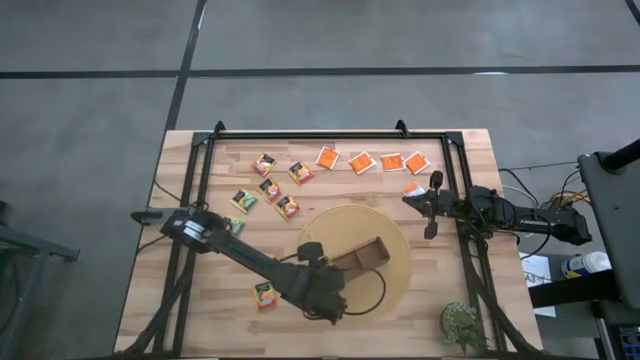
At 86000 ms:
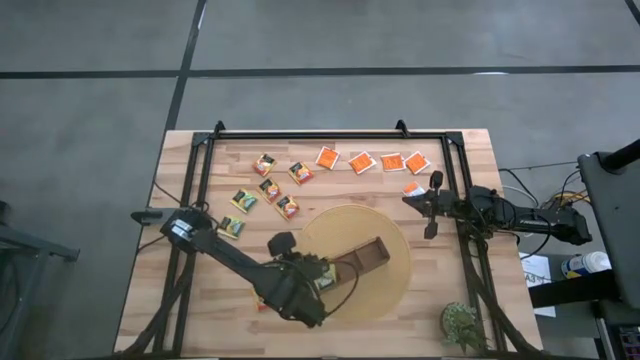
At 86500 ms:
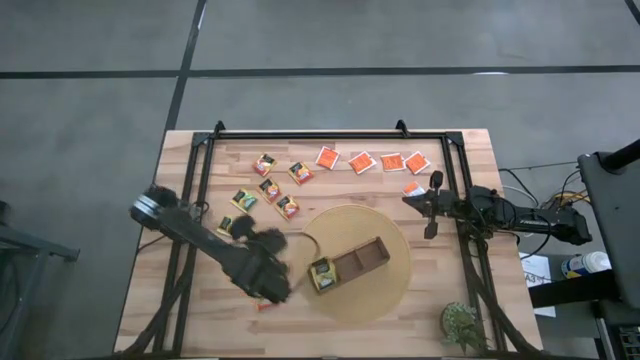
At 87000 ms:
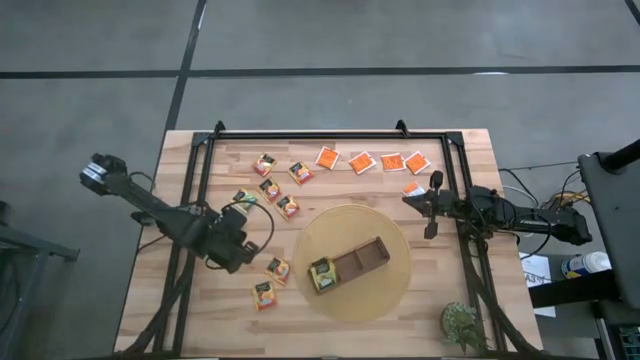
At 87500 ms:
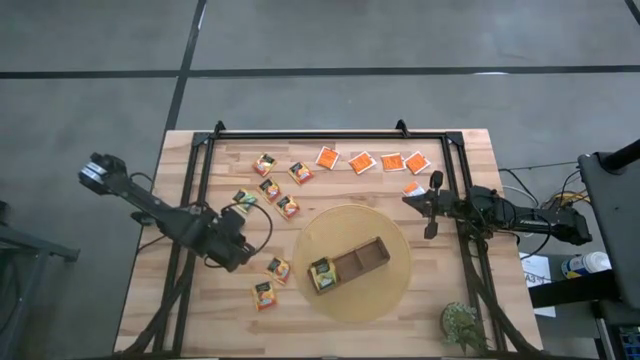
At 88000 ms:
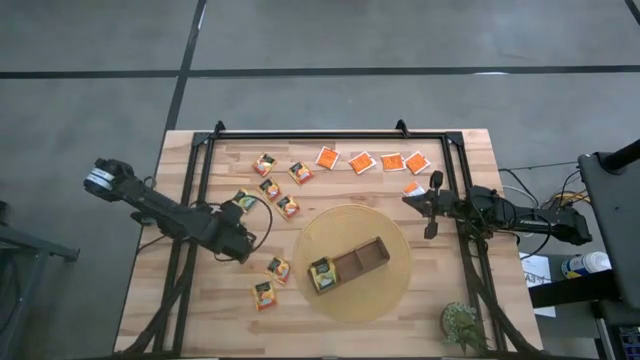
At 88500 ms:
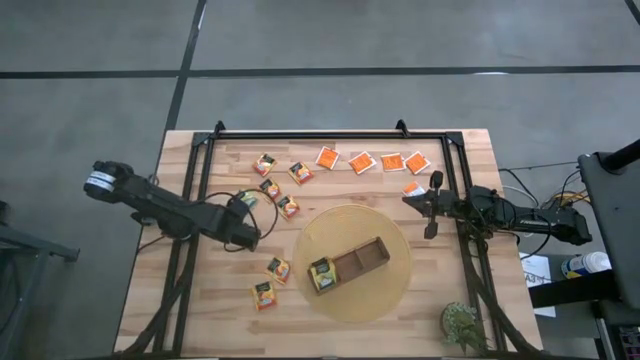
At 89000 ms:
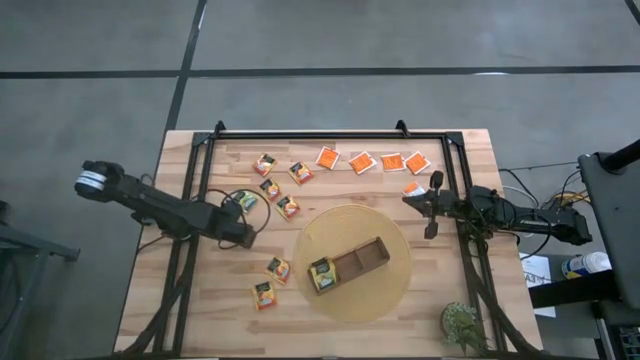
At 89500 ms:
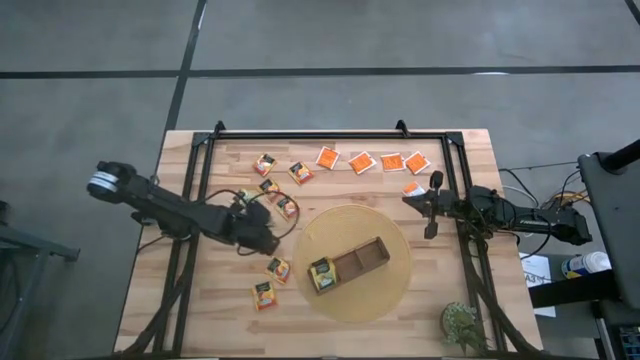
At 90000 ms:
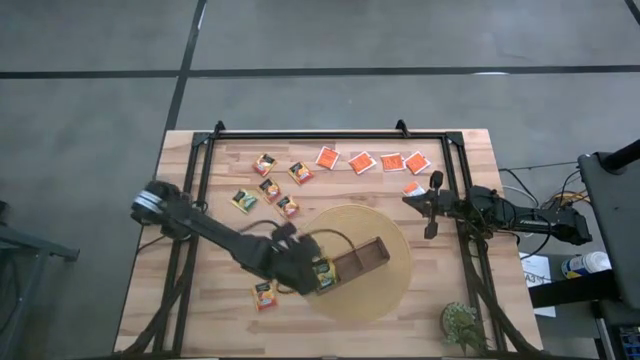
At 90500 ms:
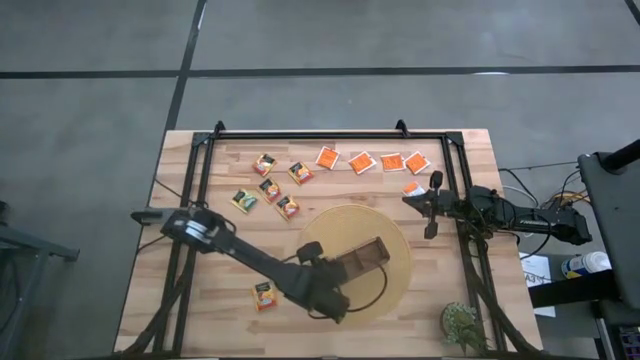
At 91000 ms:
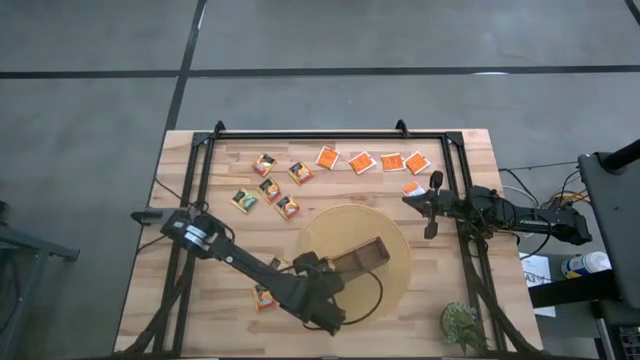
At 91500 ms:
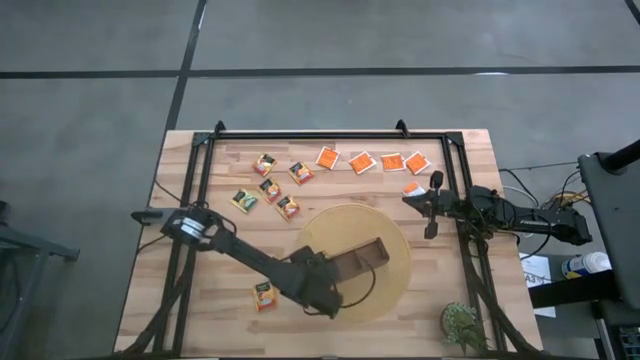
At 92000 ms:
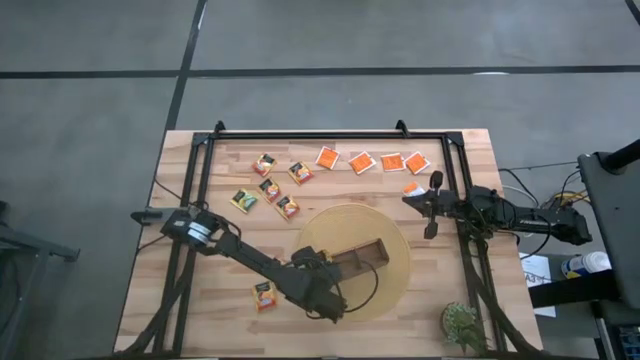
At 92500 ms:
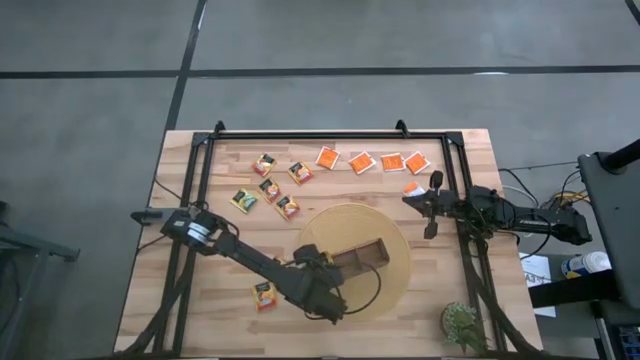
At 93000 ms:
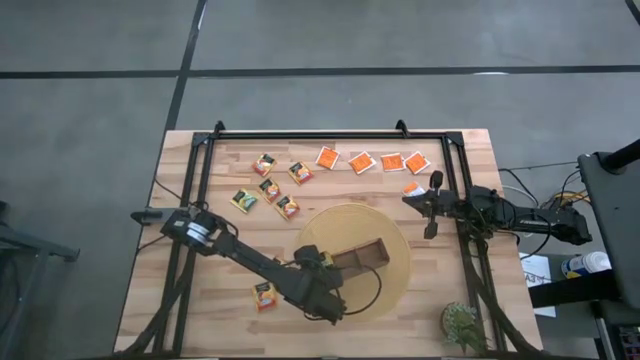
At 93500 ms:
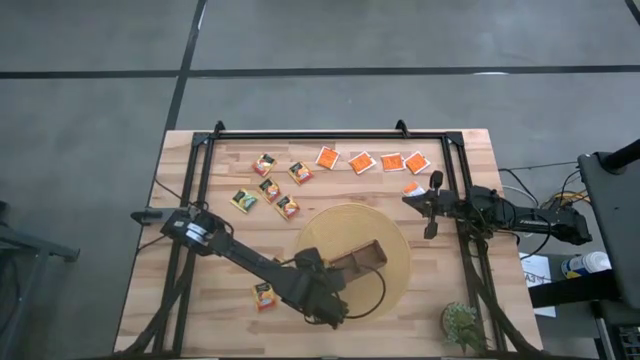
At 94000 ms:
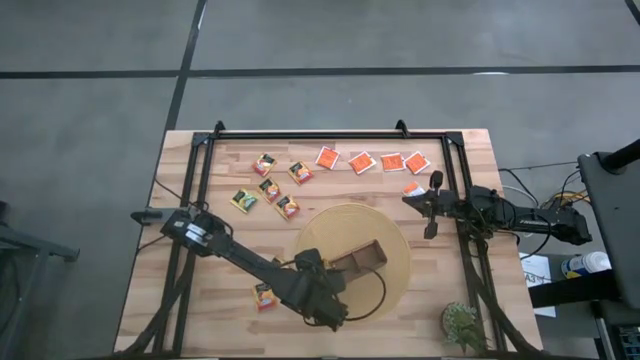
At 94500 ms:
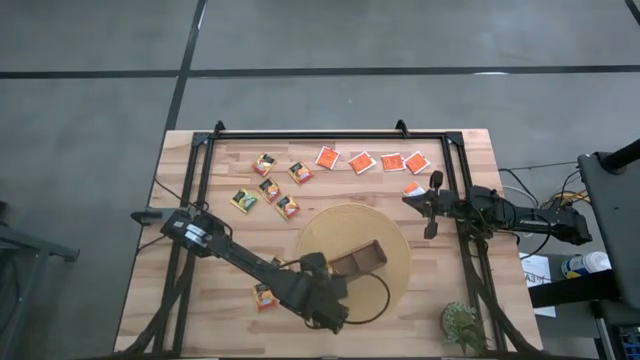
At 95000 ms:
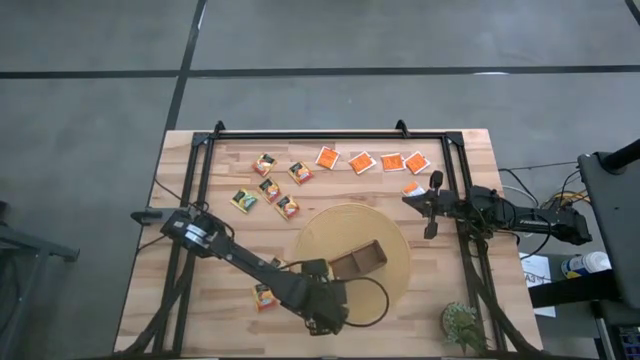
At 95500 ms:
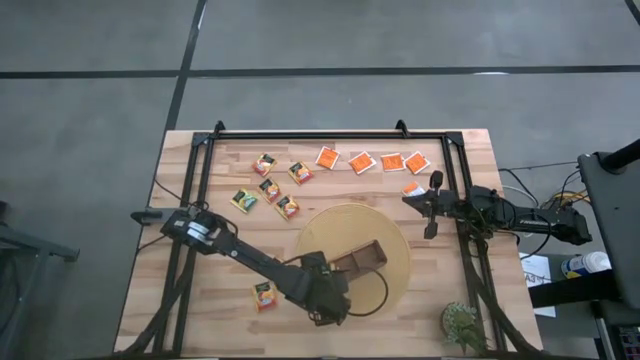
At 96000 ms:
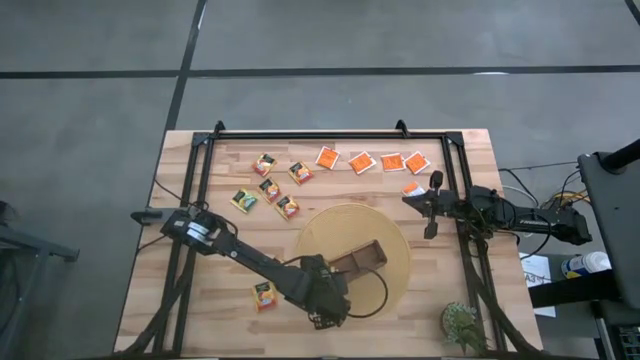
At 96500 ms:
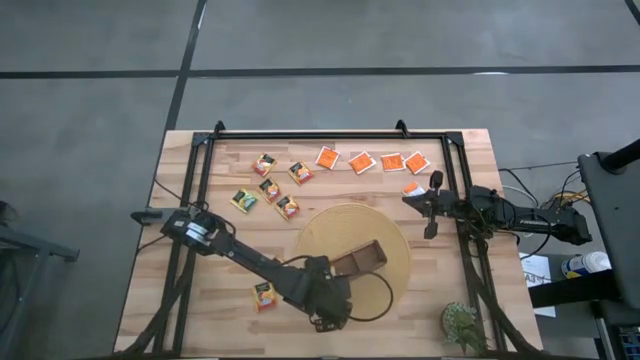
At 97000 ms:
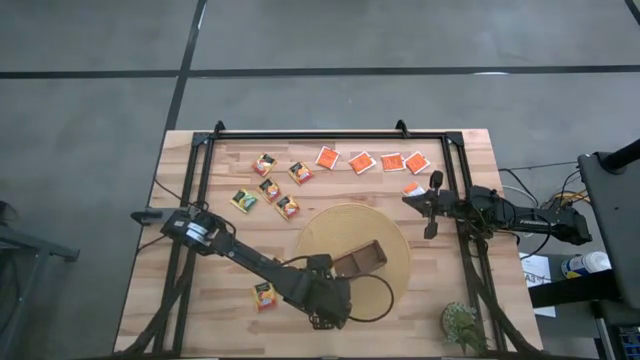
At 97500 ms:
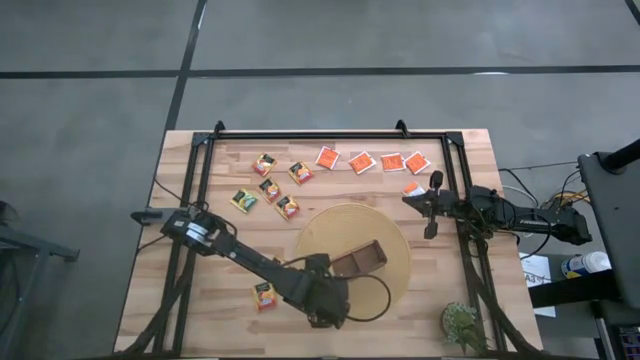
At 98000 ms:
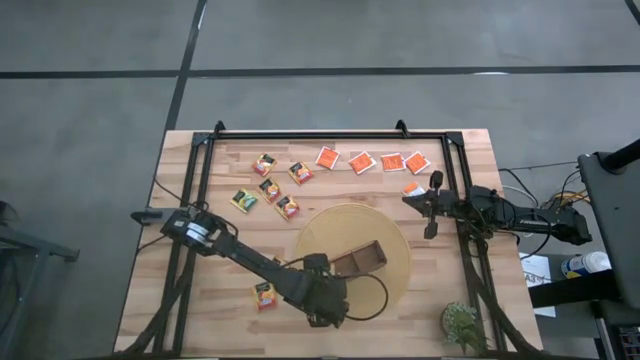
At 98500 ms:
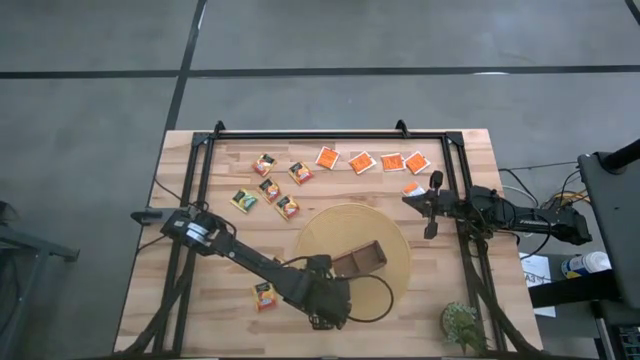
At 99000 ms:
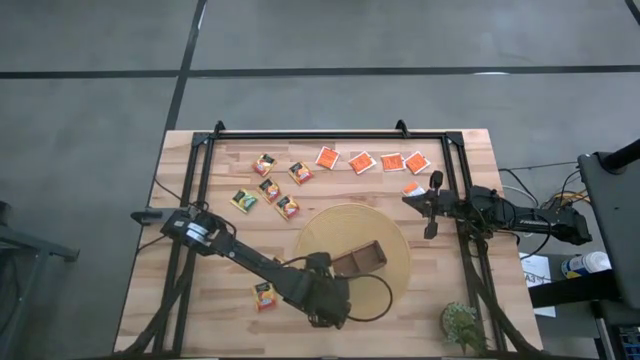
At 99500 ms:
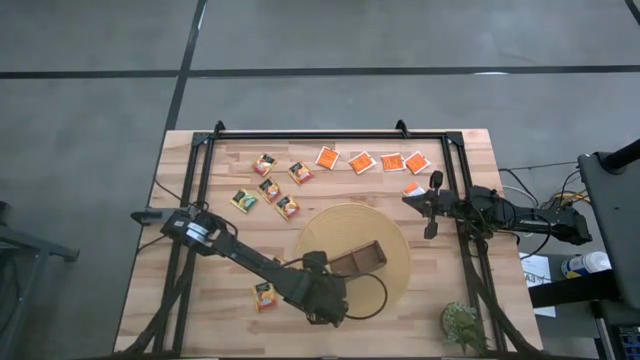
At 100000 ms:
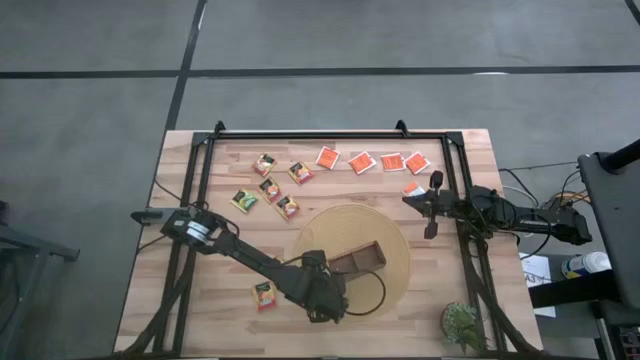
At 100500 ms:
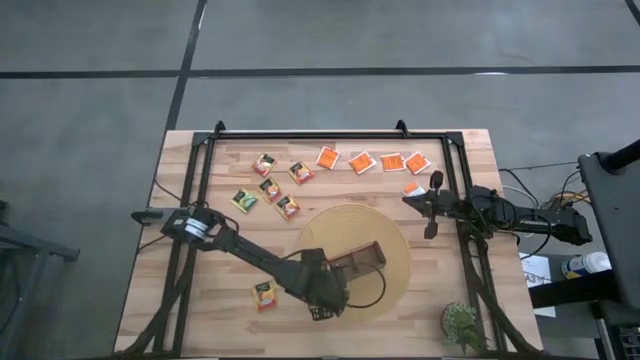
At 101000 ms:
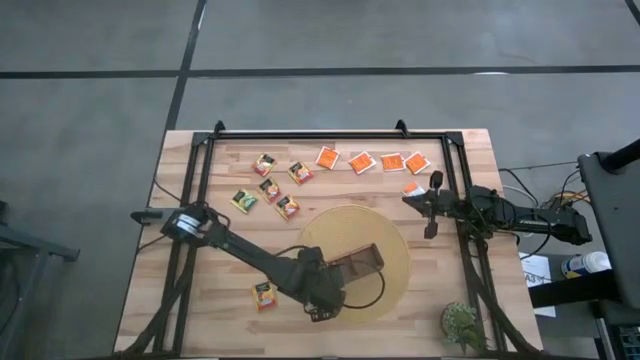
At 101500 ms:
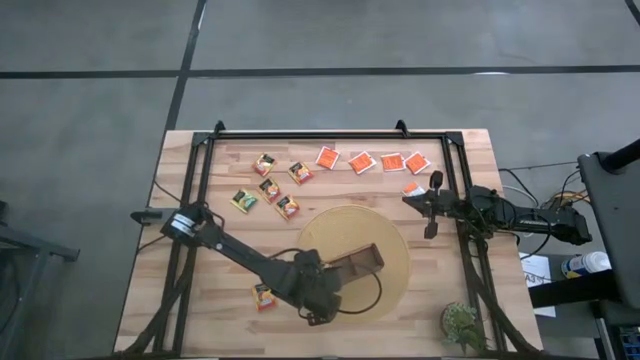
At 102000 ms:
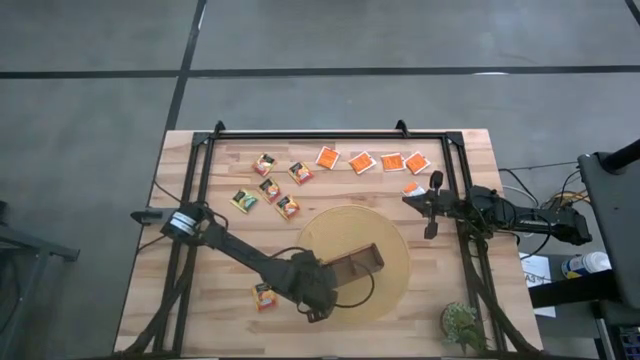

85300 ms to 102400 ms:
Task: Pick & Place Tea
Put the green tea bag into the left section of the wooden organizer

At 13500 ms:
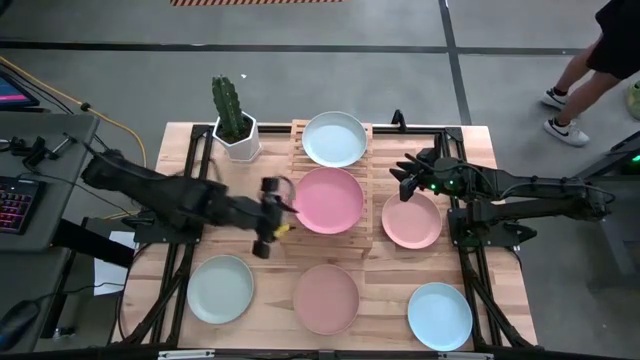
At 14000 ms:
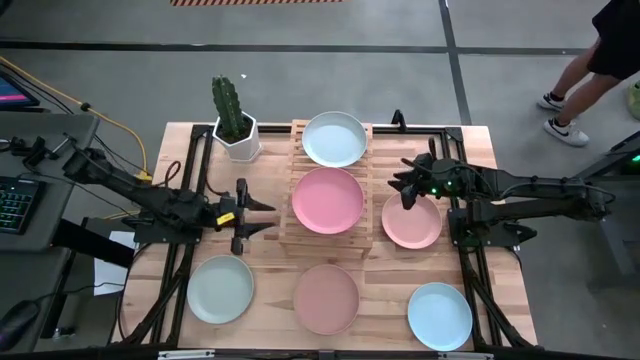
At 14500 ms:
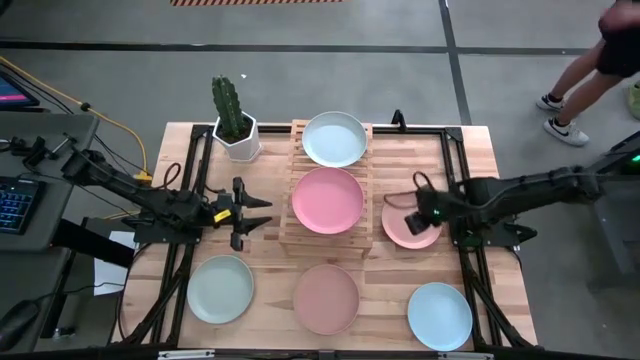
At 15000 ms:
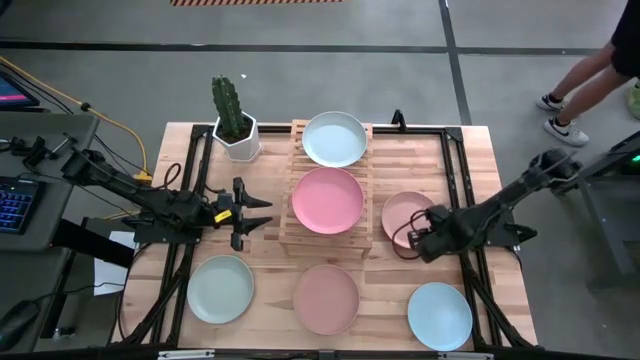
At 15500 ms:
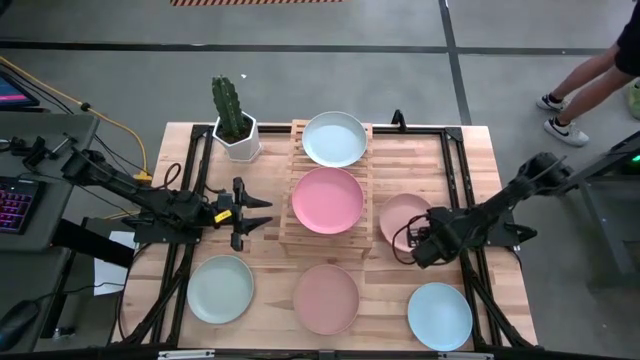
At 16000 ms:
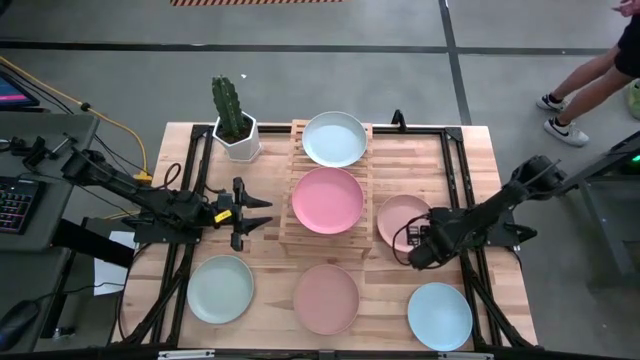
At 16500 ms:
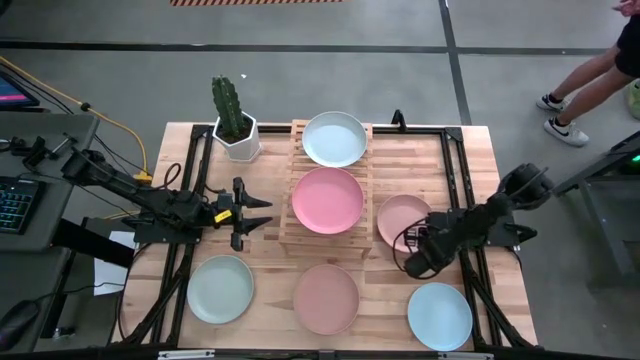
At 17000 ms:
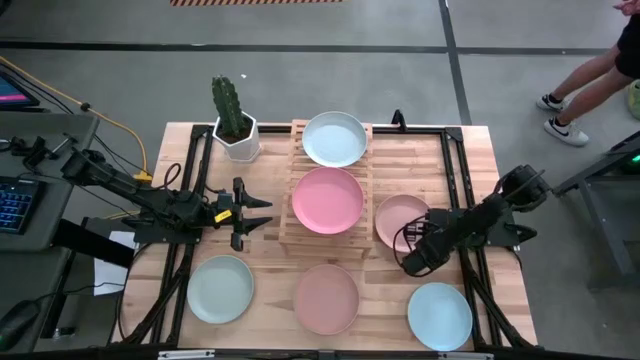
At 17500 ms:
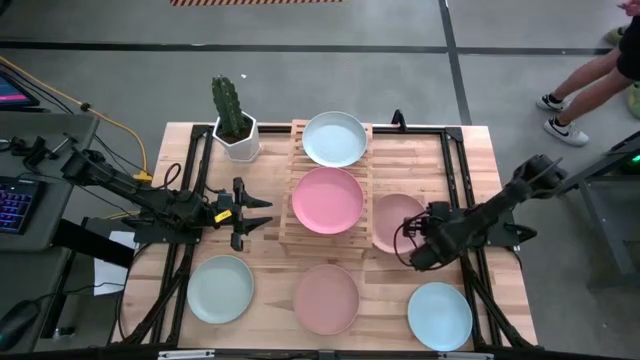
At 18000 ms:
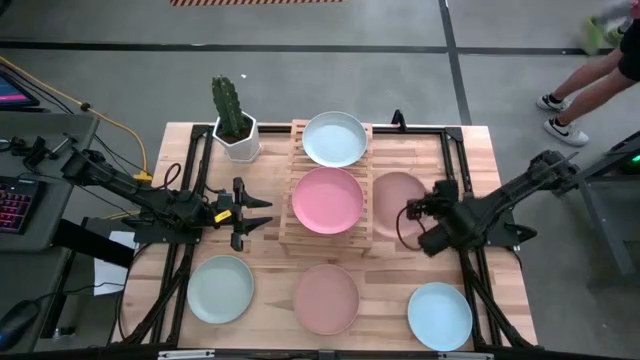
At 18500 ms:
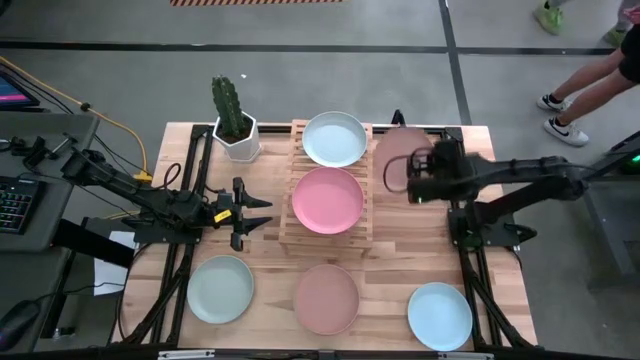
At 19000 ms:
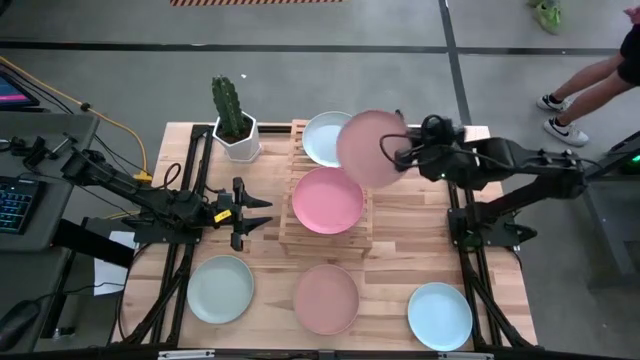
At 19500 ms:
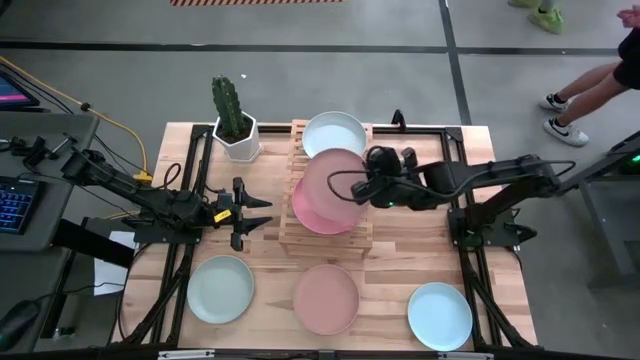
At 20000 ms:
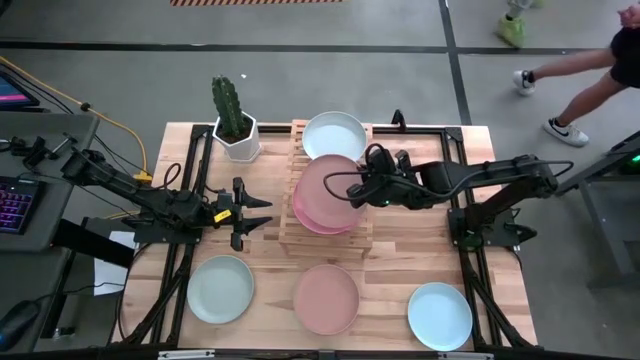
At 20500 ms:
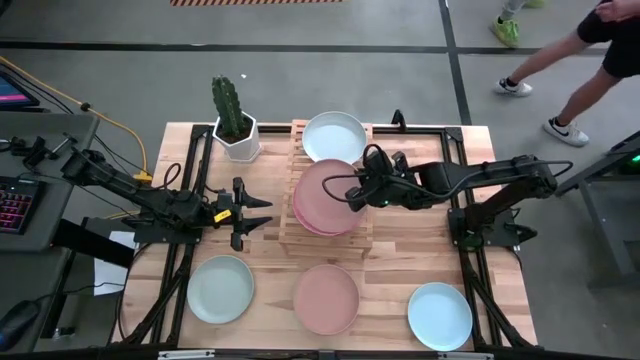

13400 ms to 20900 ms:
Task: Place and stack plates onto a shelf
Stack the light brown plate on the pink plate on the shelf
